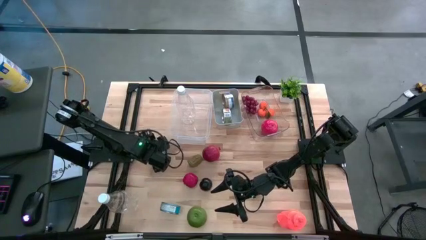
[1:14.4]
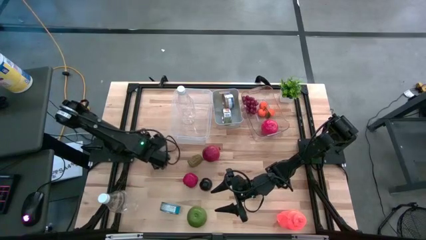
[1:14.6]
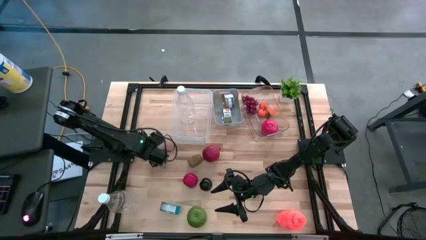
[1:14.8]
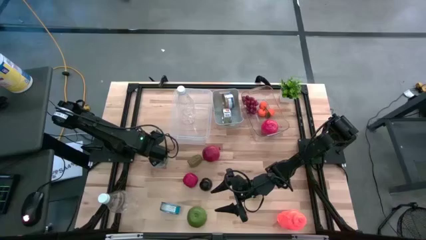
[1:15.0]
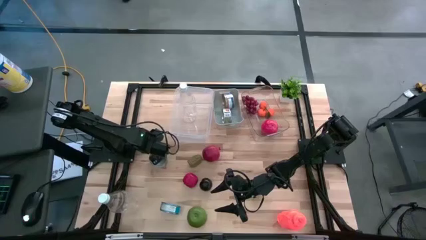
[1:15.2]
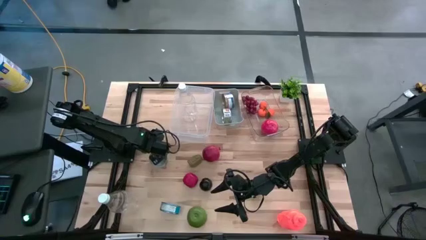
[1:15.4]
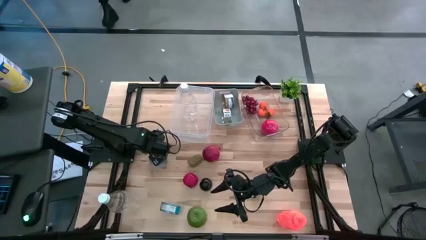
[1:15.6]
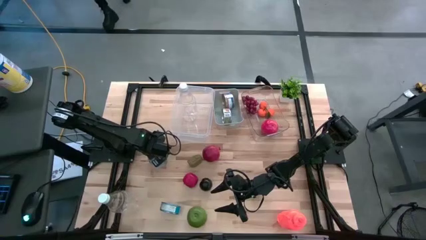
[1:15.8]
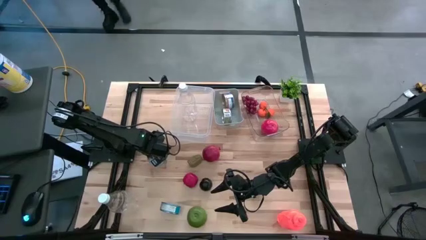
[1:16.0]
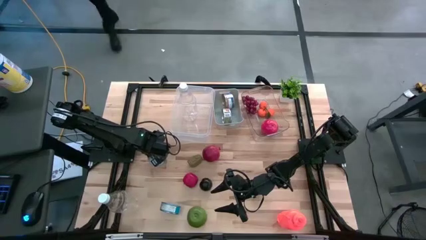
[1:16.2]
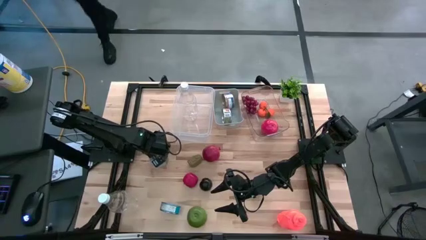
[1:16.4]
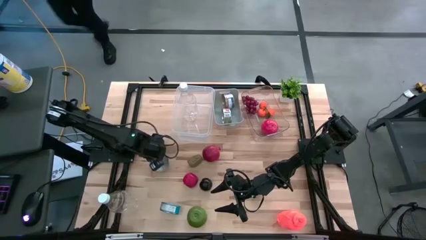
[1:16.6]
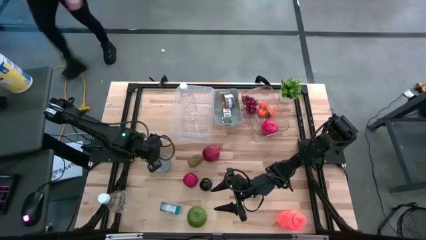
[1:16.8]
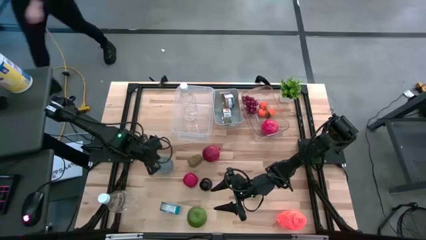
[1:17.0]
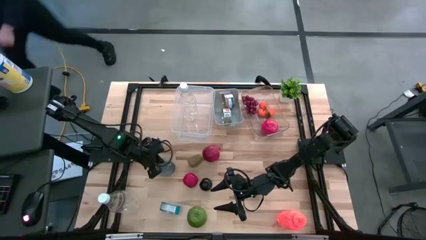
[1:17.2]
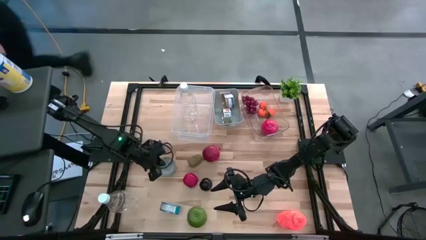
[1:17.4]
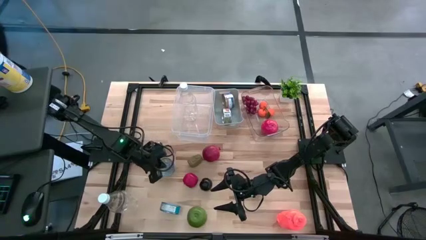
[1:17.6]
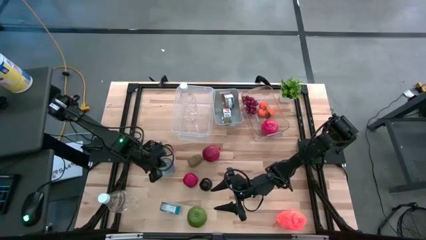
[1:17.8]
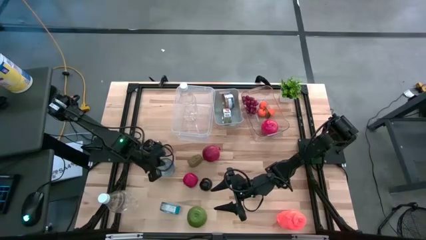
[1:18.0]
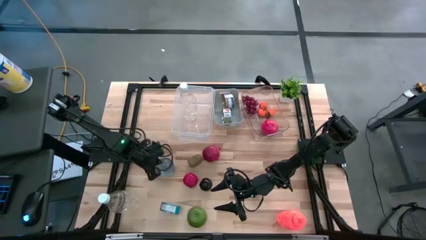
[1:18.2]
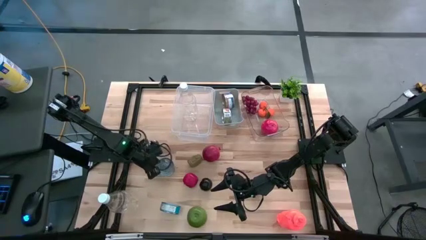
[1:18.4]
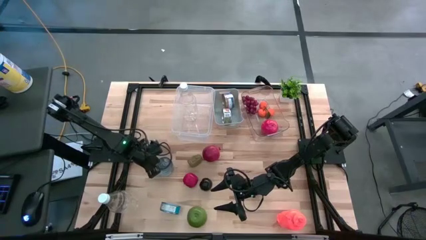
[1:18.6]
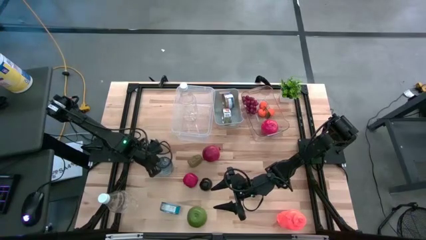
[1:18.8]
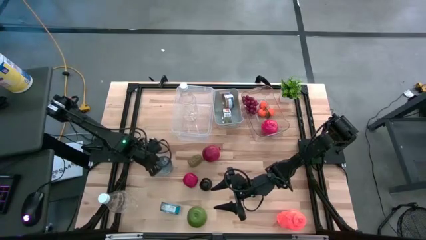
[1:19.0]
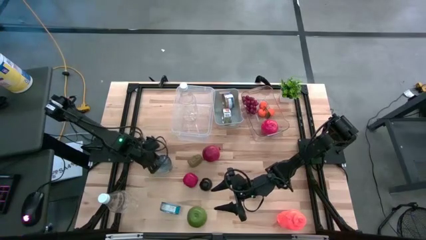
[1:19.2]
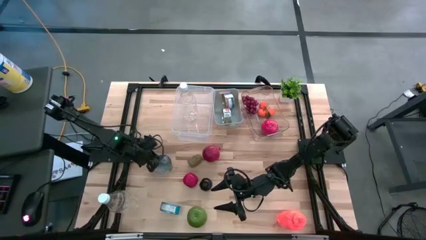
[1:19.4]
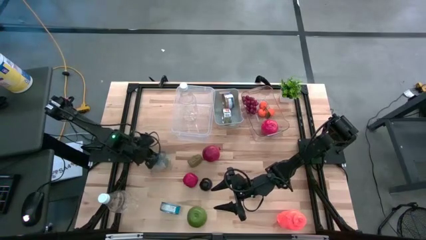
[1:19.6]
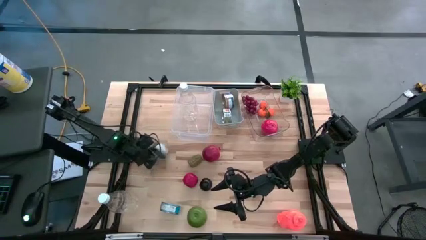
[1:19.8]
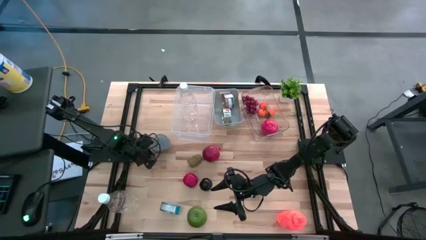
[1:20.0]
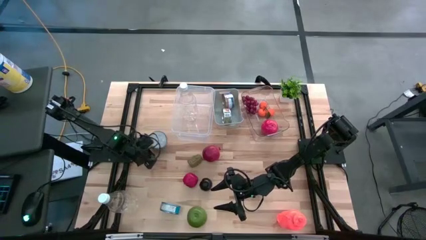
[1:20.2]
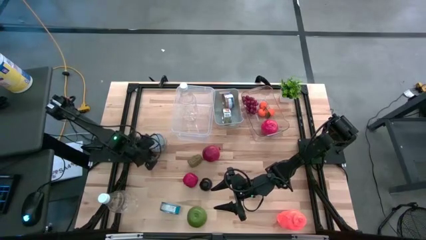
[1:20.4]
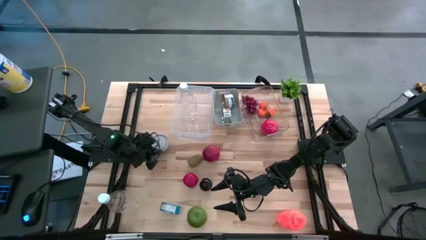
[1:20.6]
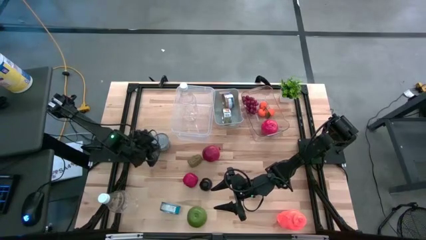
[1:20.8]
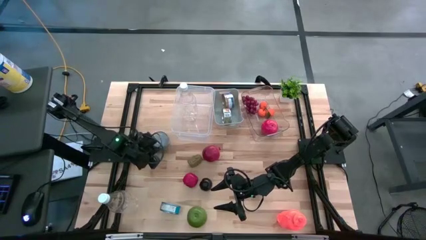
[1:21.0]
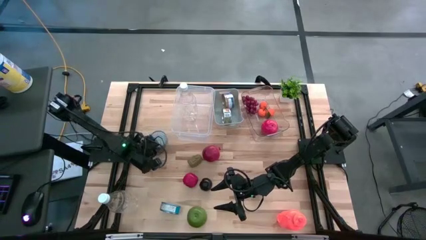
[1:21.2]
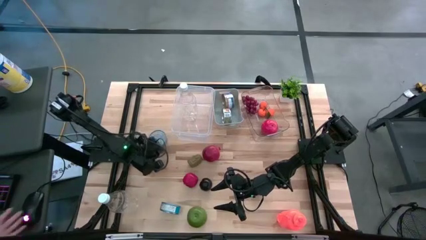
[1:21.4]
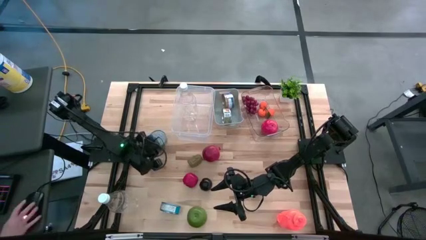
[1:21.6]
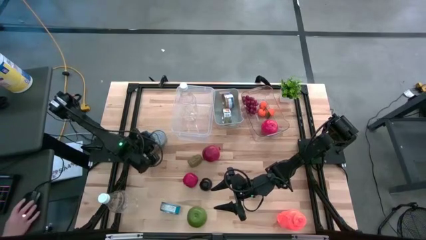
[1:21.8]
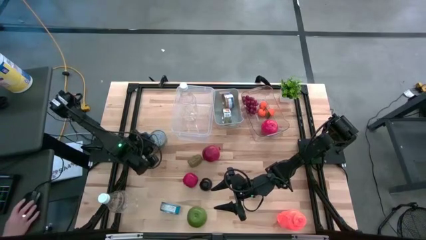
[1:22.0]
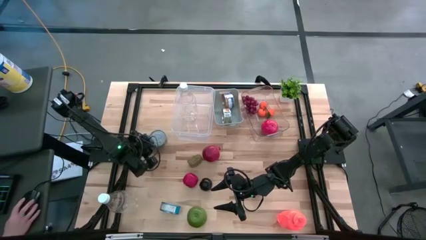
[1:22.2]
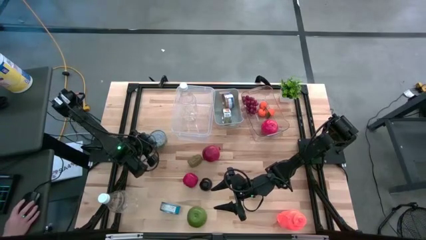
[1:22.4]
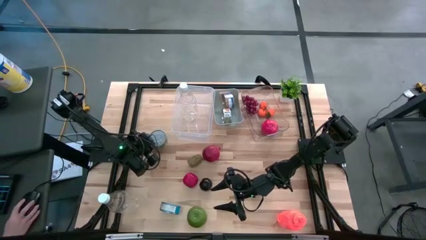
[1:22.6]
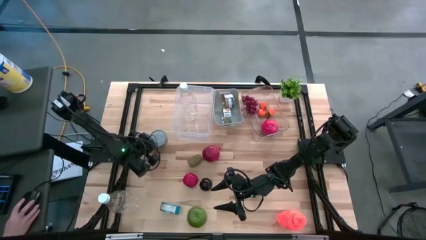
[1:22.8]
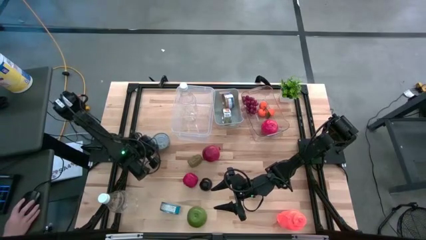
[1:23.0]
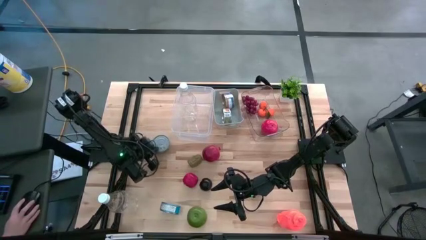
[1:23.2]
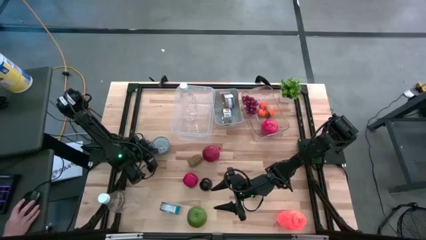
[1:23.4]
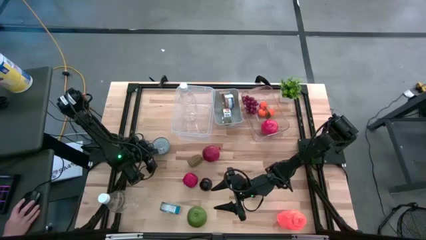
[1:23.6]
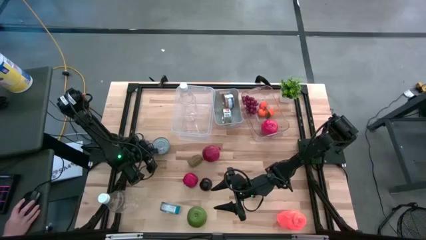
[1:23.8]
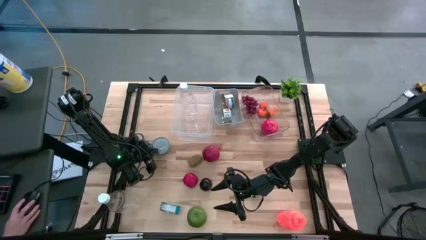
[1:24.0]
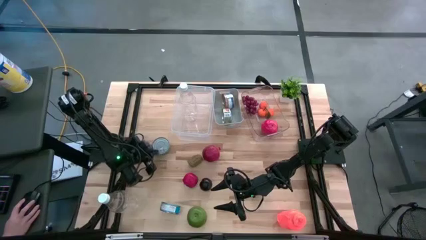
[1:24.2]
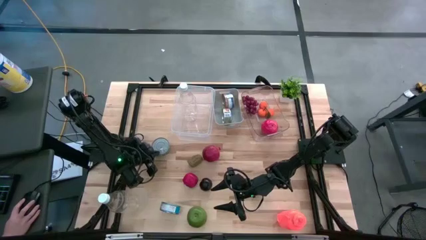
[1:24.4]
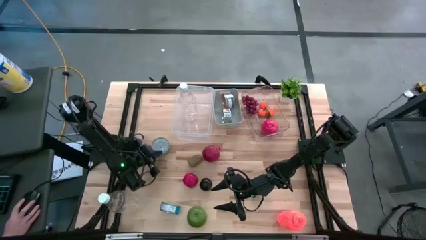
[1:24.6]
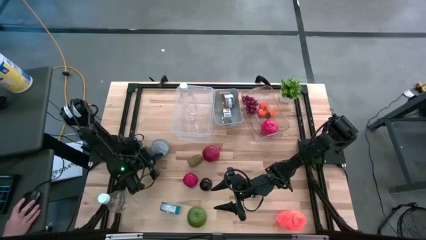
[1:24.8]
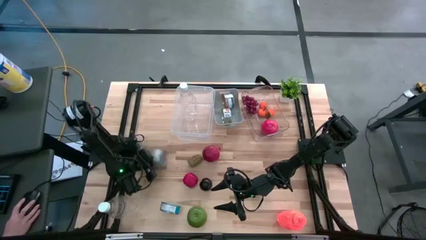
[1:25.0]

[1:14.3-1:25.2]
Task: Pick & Place Food Item
Put the green canned tuna into the white bin

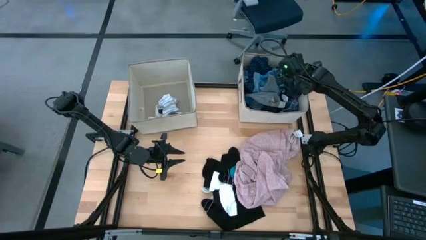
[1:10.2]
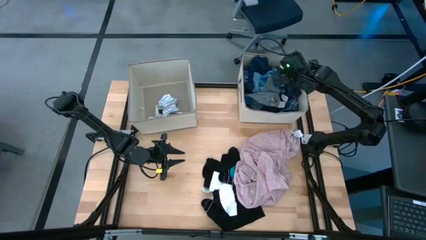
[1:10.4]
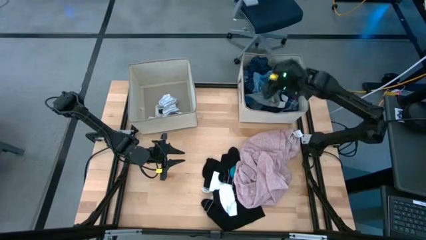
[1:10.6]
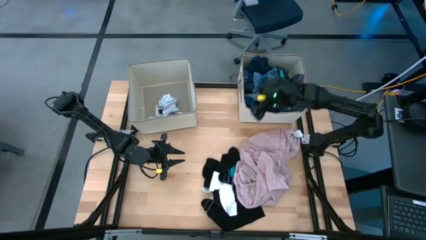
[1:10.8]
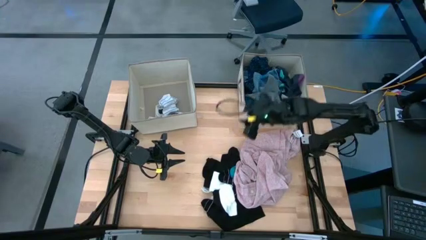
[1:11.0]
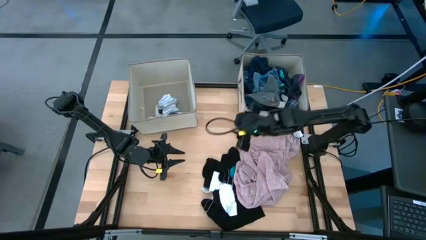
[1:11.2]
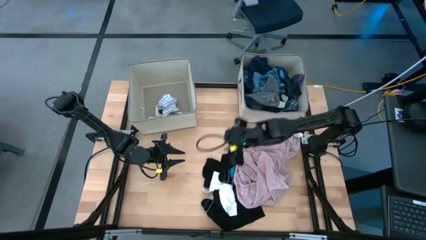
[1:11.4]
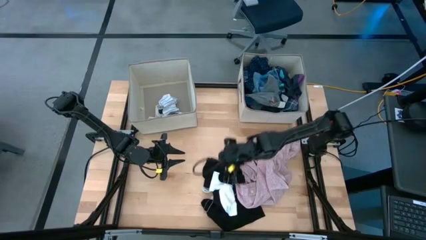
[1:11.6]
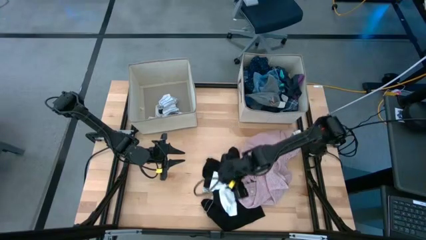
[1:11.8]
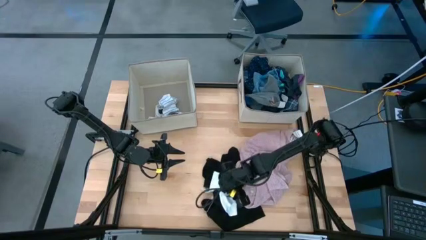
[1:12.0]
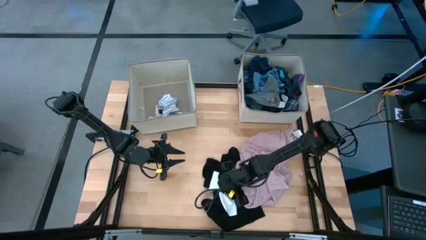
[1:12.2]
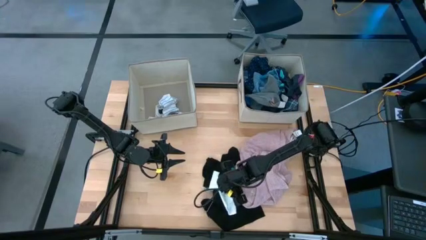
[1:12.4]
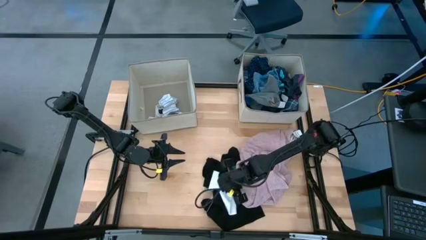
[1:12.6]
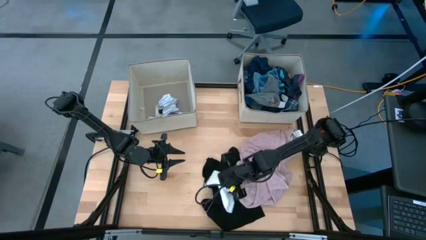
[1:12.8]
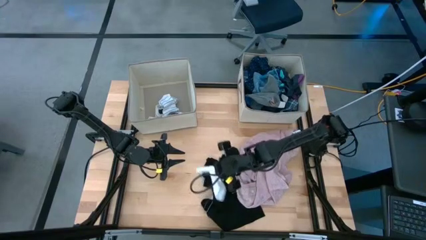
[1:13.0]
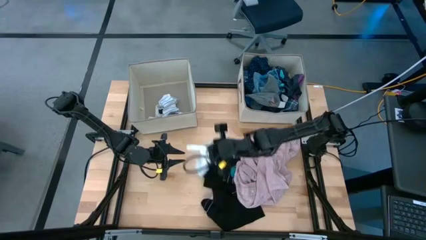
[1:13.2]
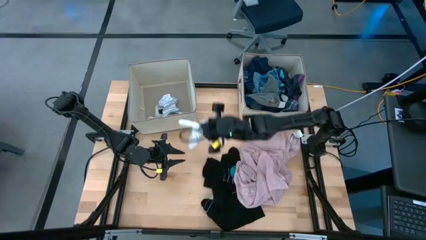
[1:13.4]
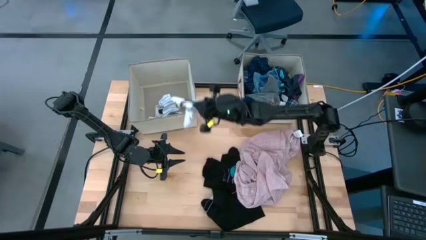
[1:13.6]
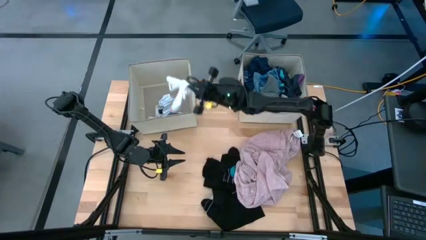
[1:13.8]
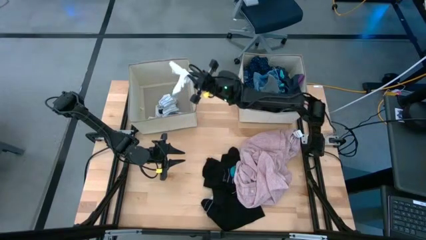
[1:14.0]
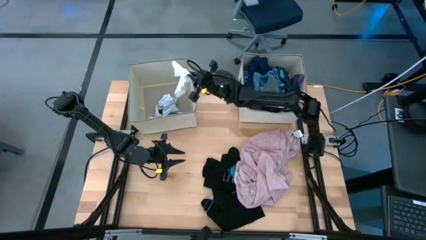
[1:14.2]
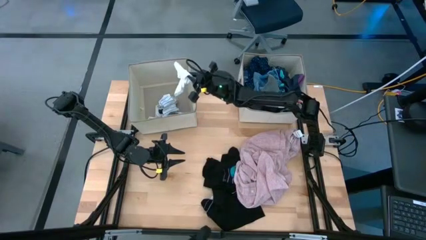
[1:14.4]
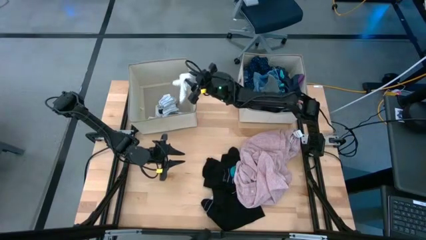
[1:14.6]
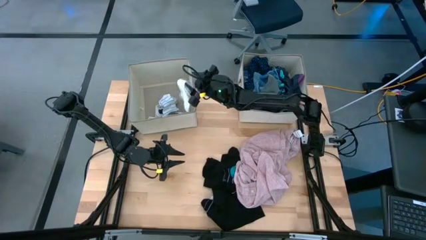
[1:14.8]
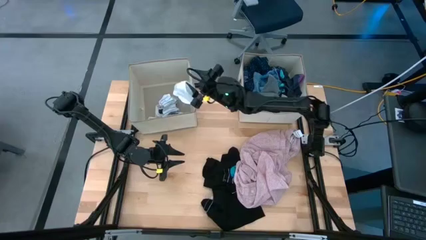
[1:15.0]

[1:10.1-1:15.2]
Task: Sort clothes
Put the white sock into the left laundry bin
